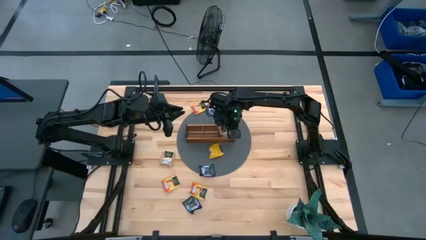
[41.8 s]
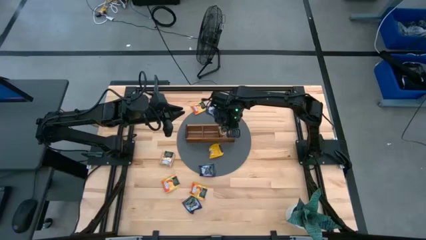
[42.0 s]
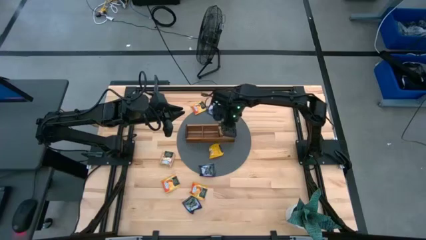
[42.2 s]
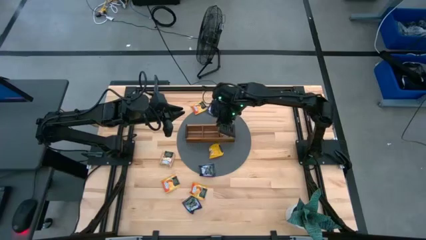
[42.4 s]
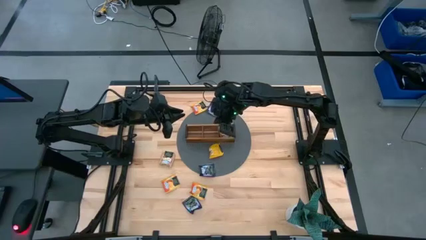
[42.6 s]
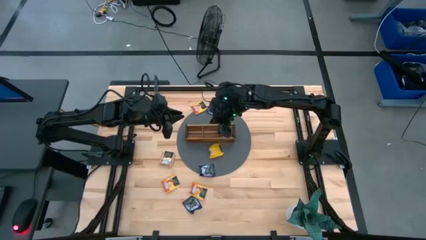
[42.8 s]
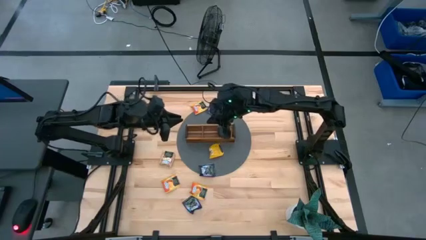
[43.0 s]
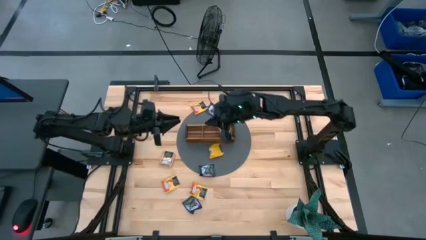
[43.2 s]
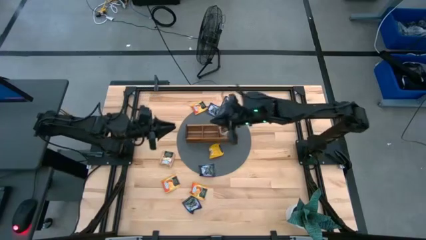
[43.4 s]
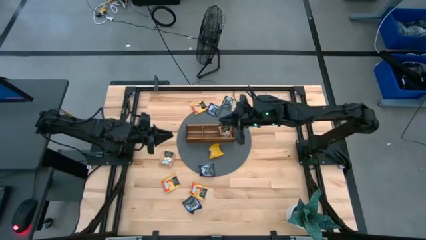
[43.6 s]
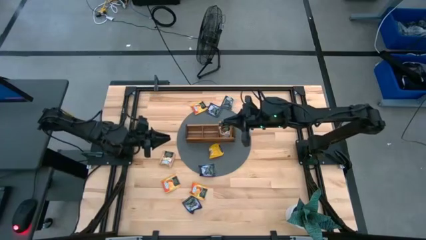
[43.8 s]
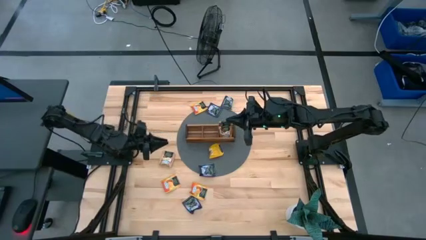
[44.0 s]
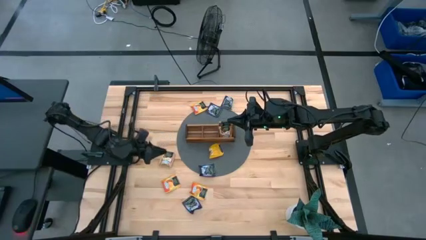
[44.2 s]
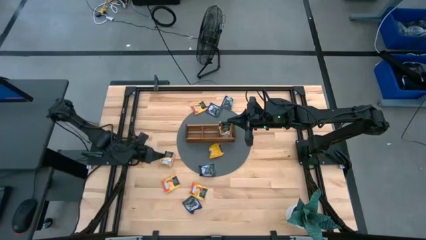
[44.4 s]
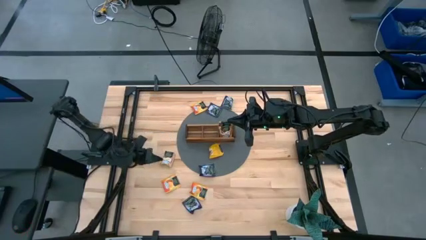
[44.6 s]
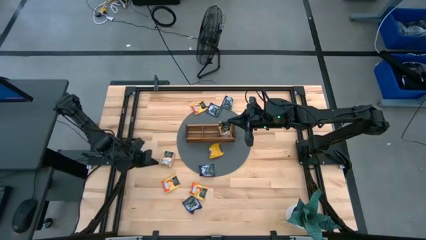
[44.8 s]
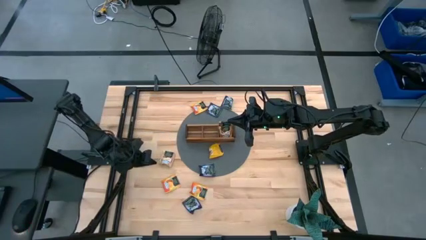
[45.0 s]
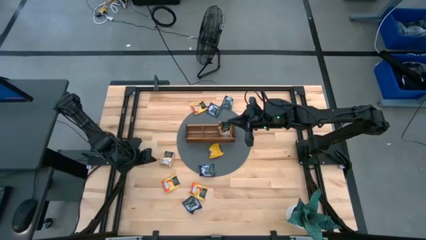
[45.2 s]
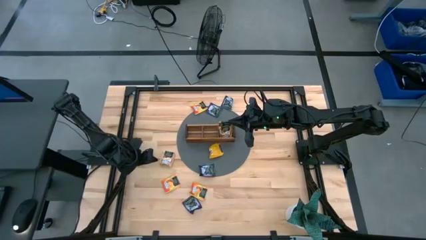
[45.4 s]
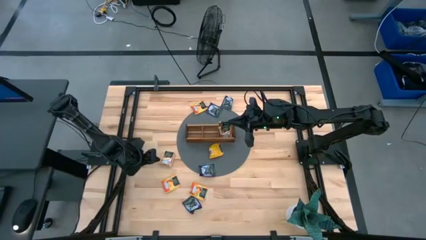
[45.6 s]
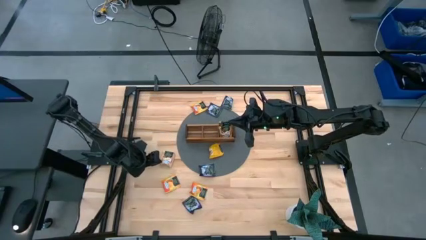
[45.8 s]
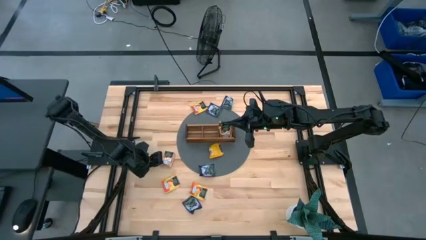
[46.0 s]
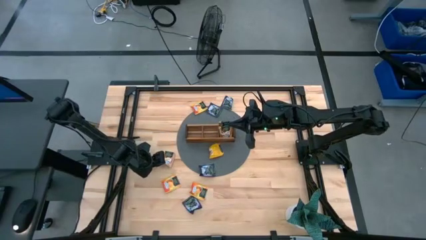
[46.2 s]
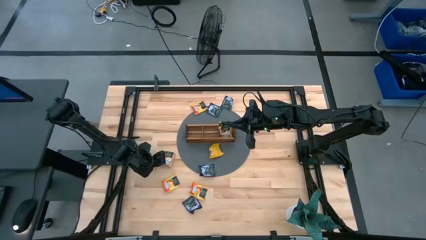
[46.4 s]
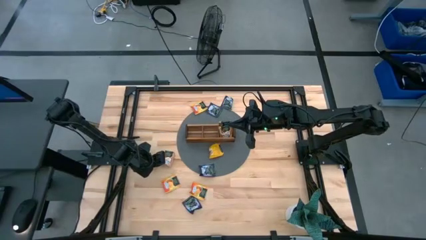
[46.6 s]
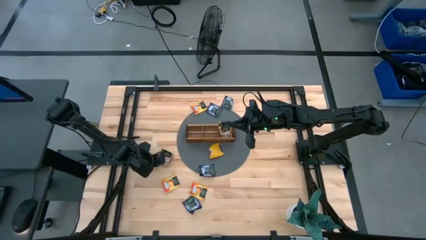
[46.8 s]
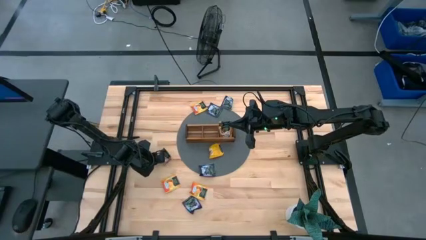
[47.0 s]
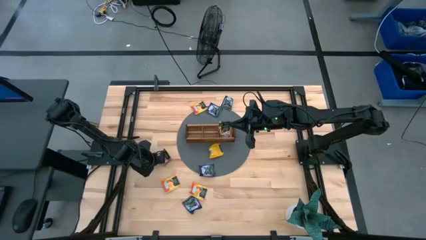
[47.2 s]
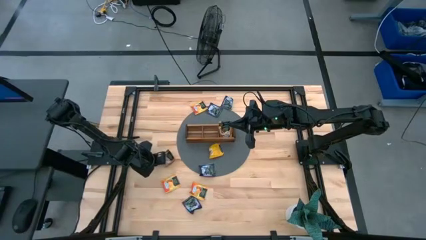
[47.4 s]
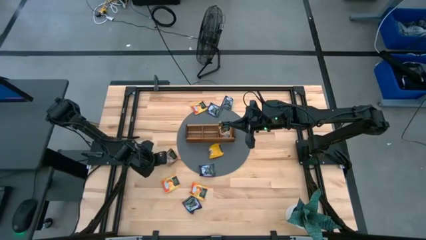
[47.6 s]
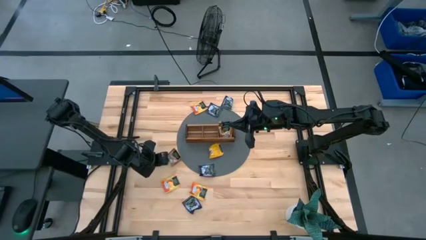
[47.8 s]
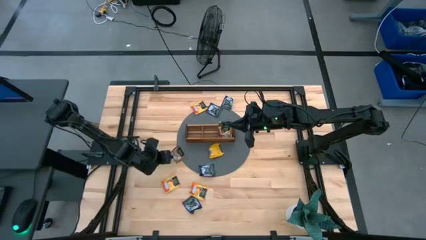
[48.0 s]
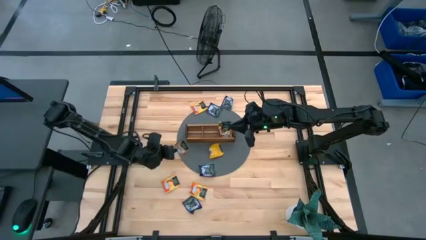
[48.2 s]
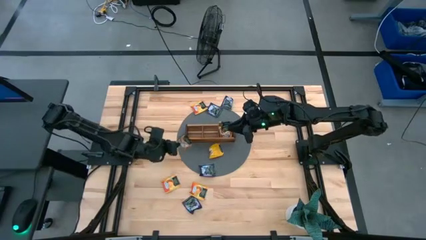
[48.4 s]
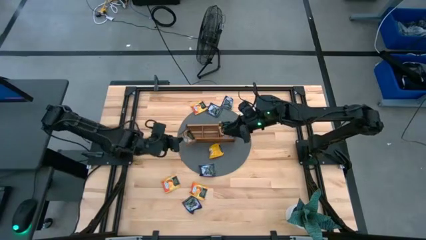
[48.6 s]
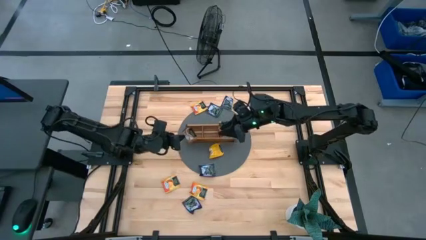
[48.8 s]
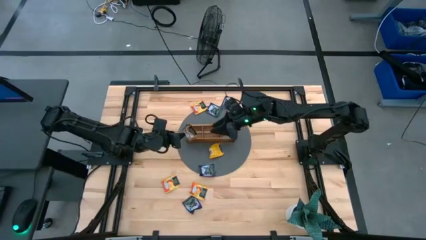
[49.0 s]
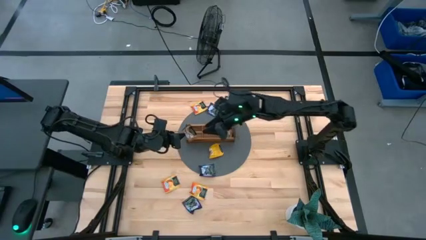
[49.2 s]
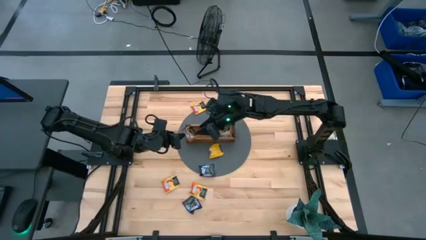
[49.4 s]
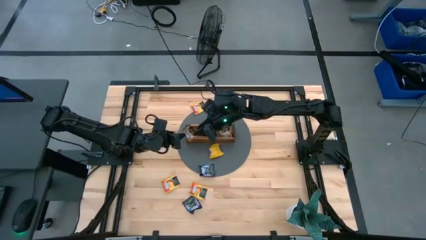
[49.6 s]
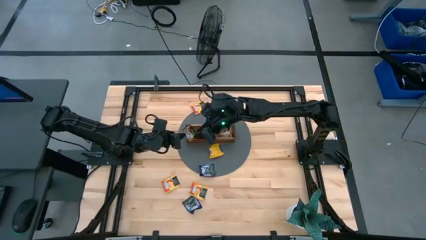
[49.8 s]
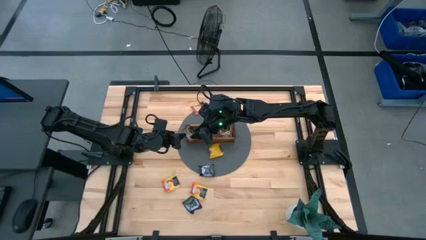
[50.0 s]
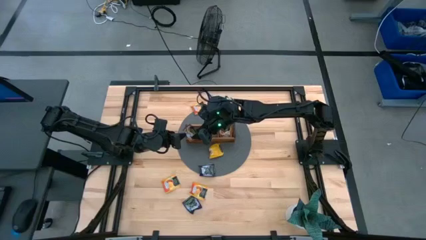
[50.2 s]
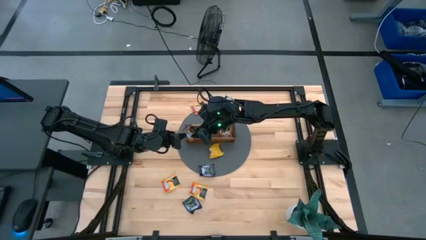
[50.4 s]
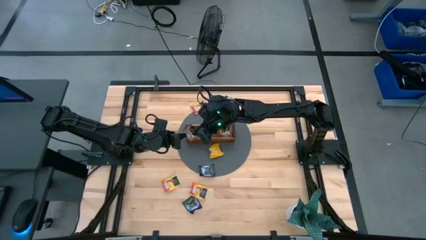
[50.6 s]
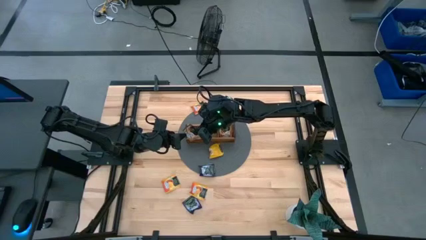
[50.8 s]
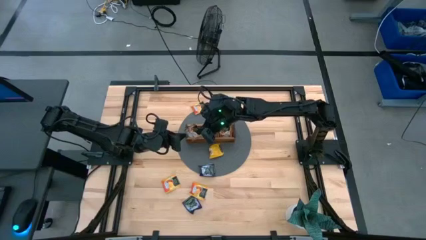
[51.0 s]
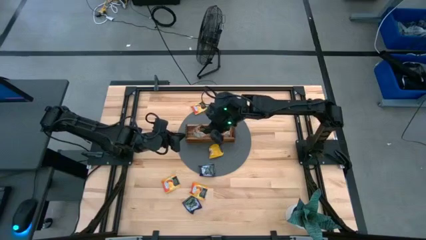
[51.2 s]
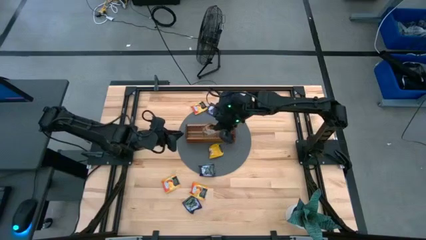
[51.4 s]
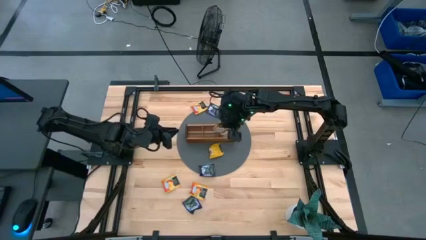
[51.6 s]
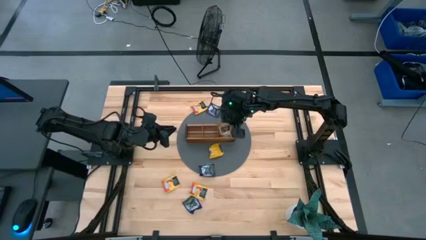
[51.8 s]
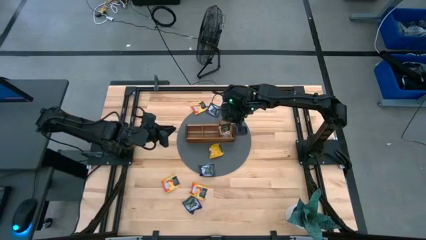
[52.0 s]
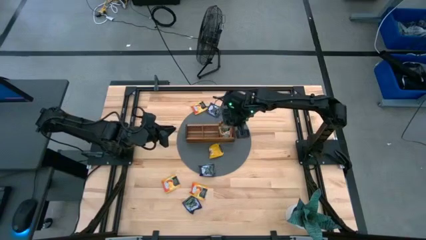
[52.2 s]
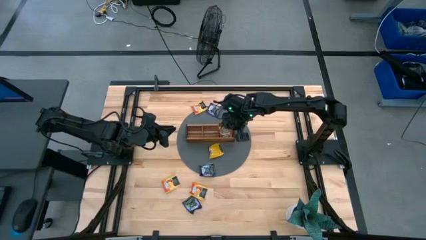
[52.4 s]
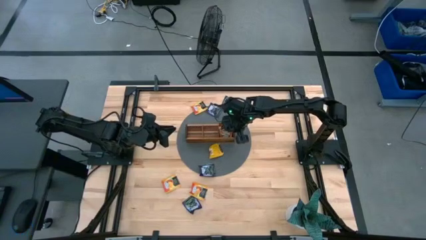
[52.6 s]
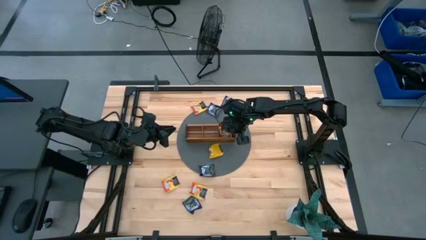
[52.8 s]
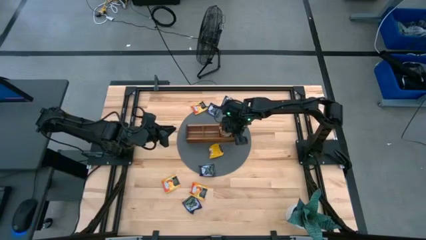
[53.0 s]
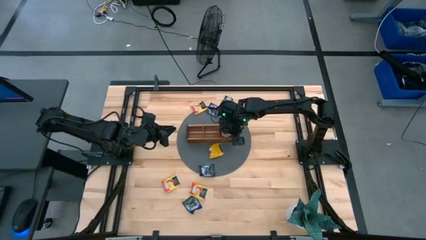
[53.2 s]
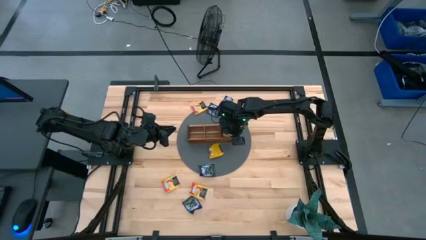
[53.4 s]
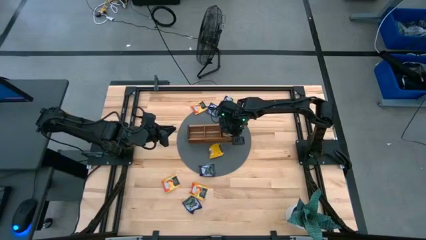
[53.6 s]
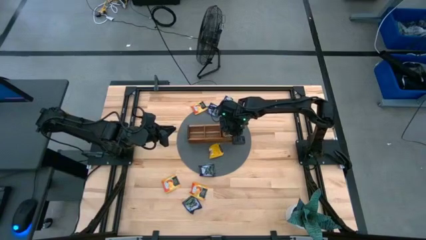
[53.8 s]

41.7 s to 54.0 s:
Task: Pick & Place Tea
Put the brown tea bag into the right section of the wooden organizer
